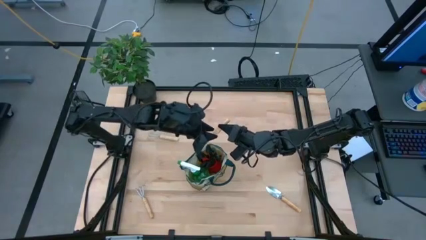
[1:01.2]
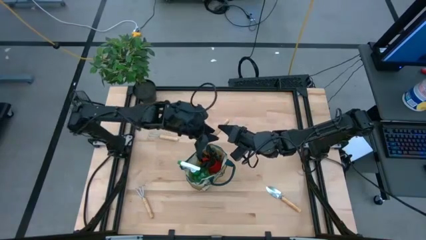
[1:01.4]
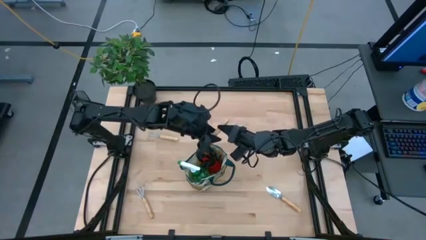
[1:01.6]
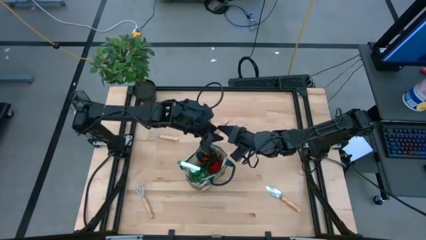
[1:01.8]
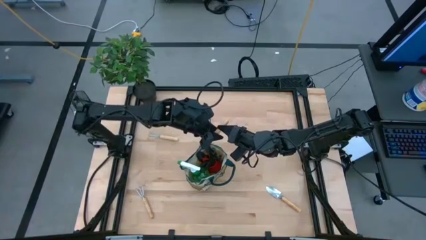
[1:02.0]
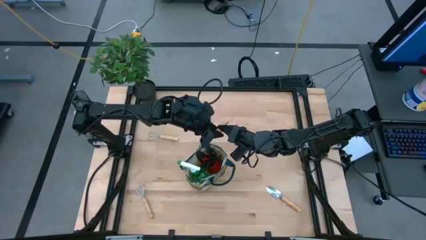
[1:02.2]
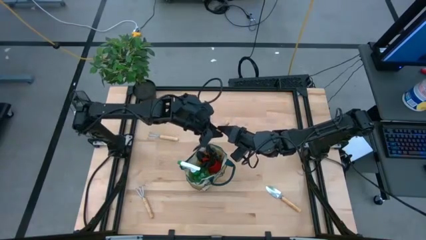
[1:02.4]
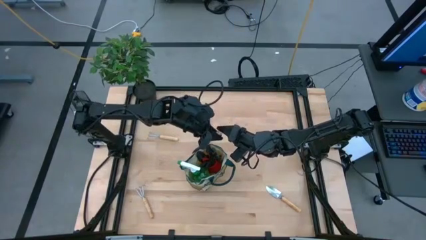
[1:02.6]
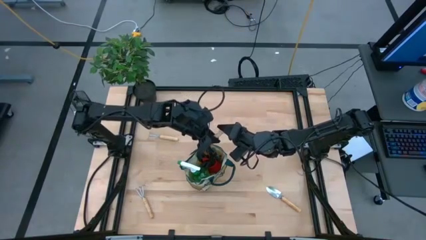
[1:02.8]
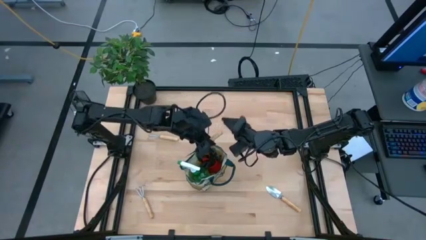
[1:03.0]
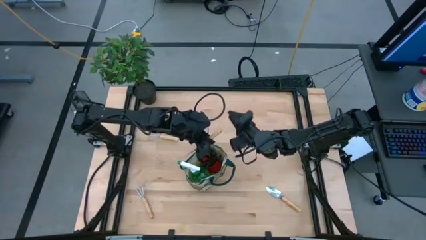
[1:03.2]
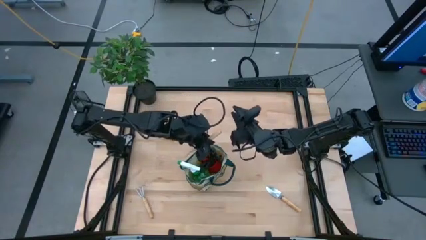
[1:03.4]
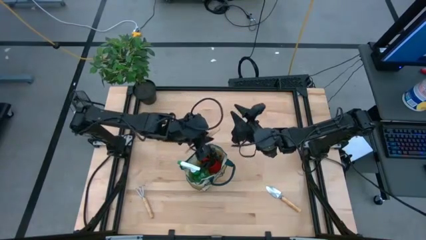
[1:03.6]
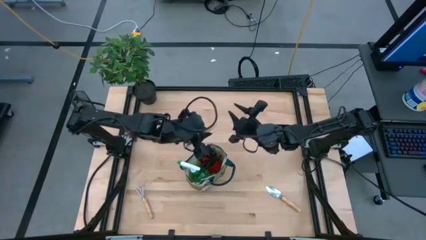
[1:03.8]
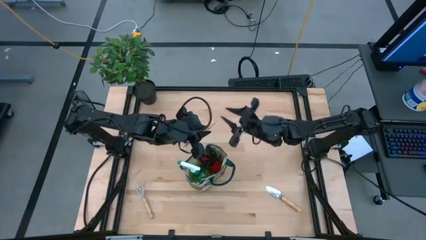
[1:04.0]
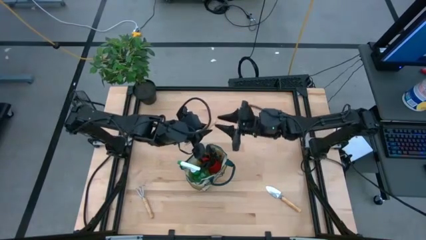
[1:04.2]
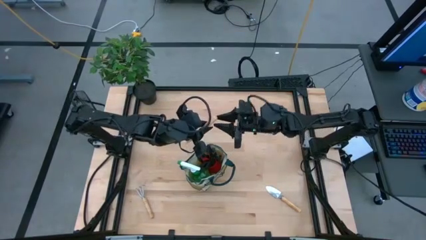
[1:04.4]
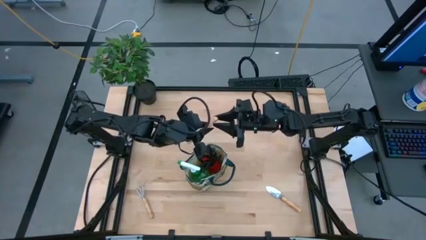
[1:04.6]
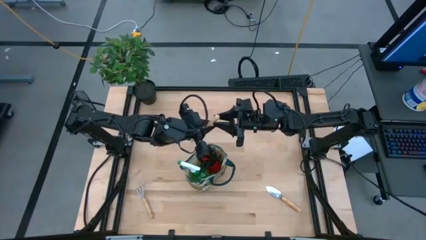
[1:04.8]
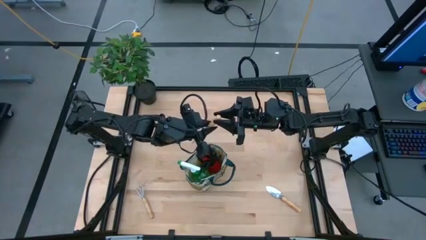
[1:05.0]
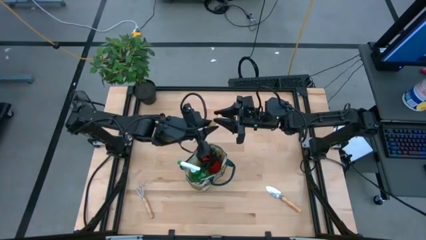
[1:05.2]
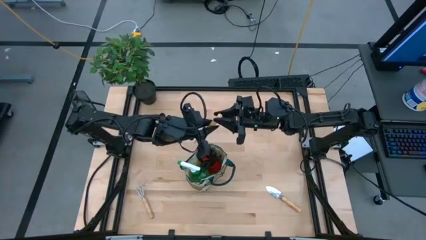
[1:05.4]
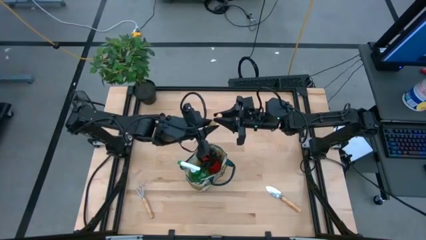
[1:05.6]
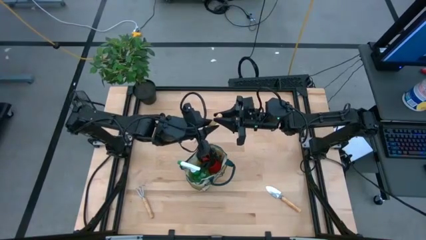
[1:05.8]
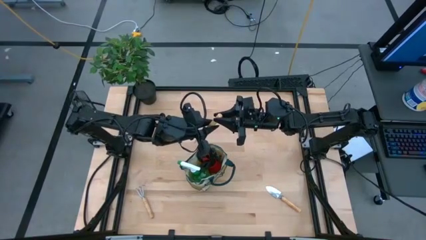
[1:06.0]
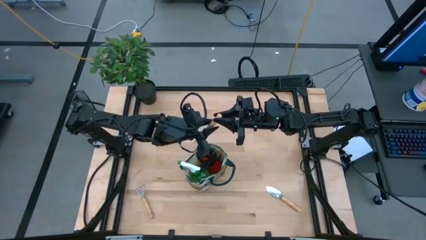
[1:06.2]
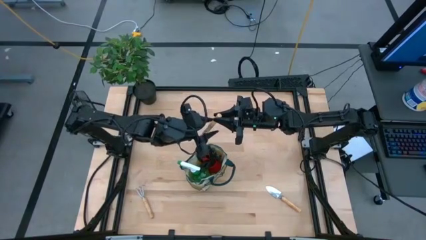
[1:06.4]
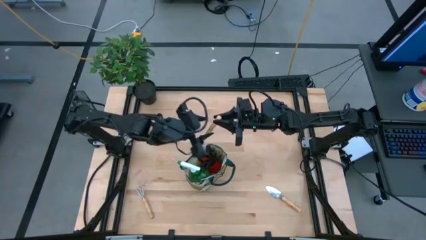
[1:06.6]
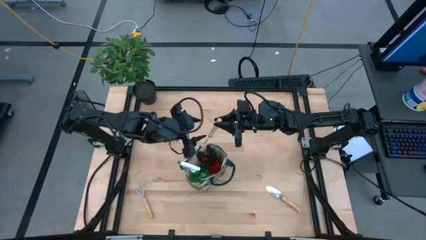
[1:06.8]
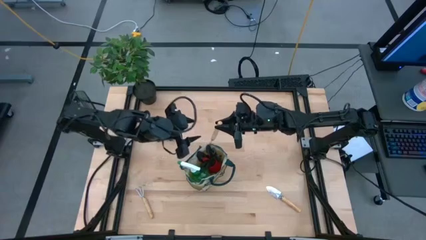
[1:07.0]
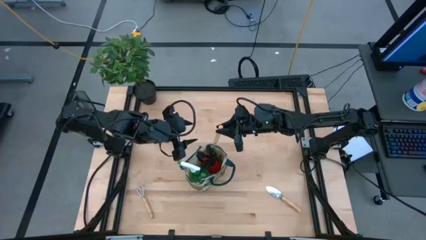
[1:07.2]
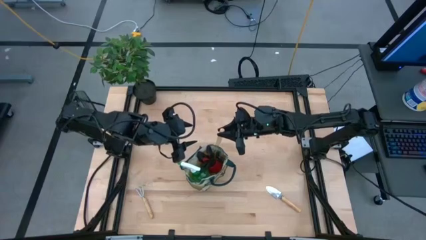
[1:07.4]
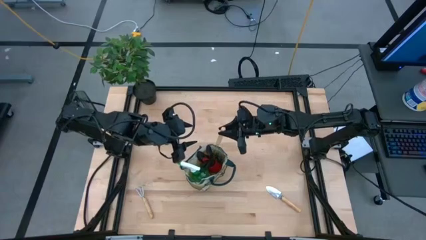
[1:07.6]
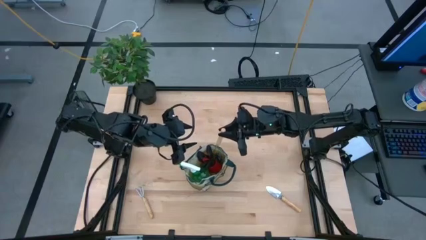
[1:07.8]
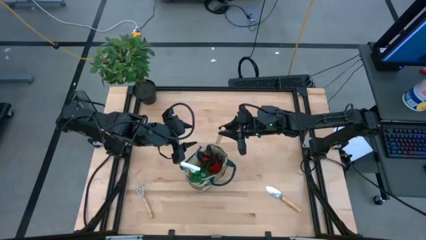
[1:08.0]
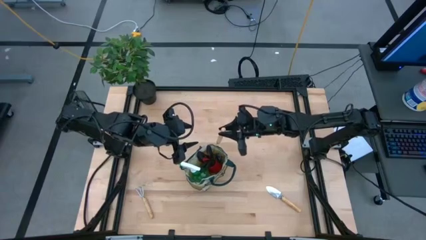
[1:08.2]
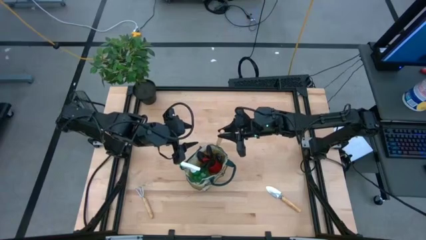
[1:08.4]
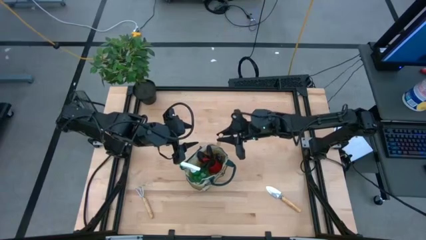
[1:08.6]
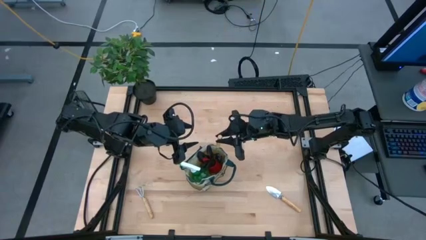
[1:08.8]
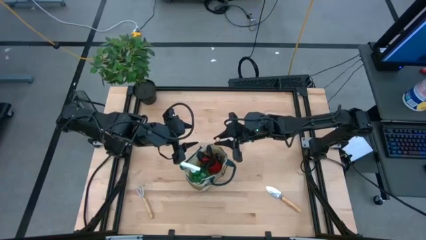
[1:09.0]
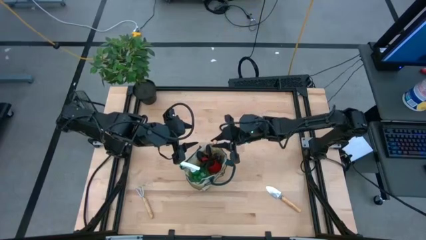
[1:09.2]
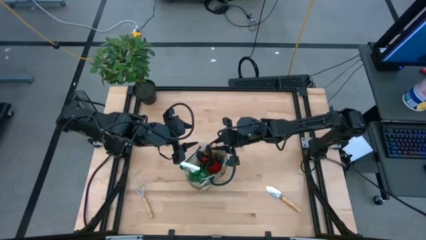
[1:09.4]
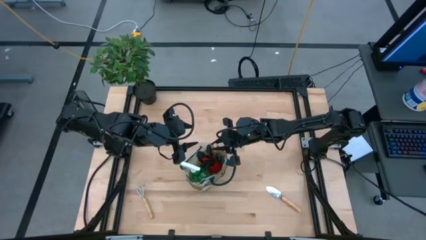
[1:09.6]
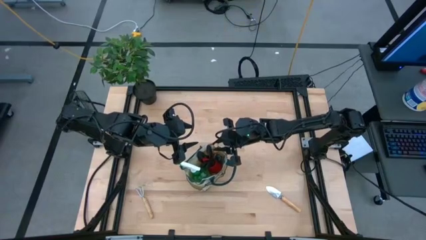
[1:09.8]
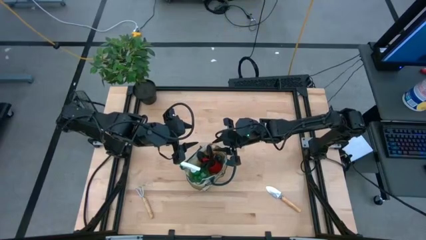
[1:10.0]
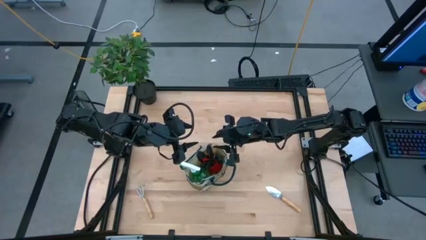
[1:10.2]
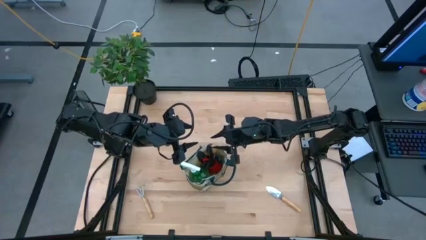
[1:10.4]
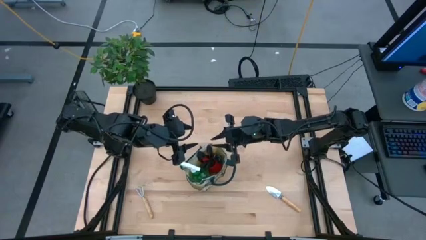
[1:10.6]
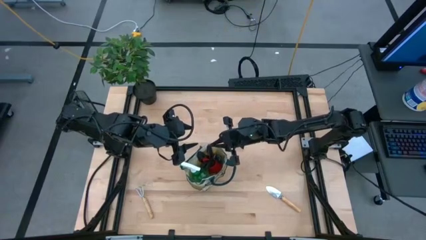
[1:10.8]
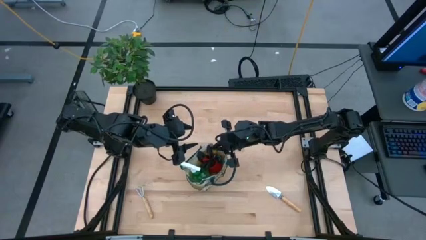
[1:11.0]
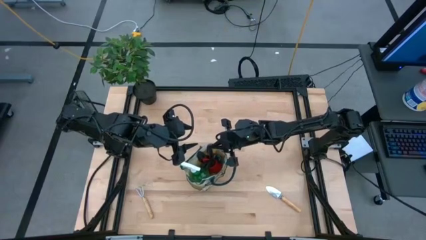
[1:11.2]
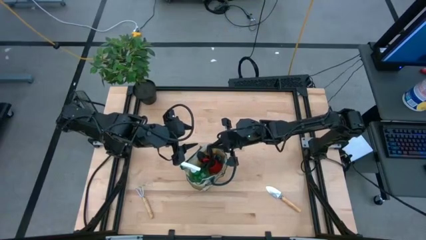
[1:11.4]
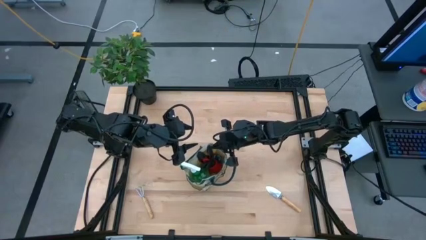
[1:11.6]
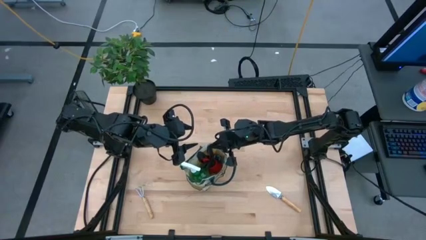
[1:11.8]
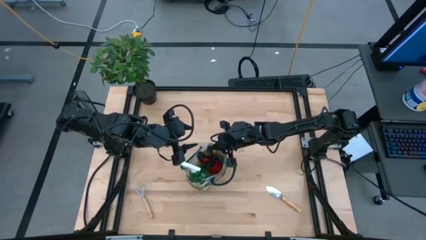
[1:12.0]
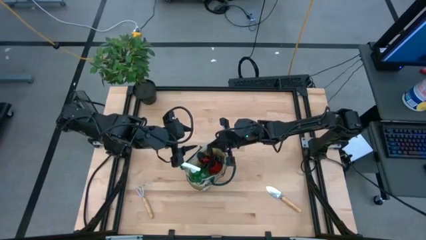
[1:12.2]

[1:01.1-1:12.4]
Task: Pick & Place Garden tools in Gardening bag
Put the top trowel into the gardening bag

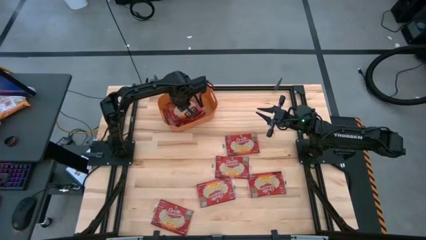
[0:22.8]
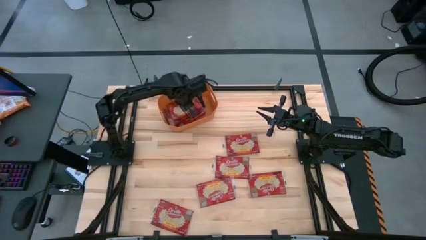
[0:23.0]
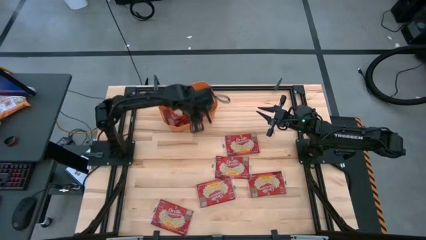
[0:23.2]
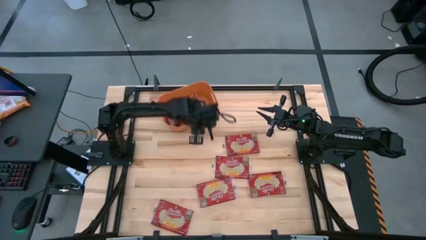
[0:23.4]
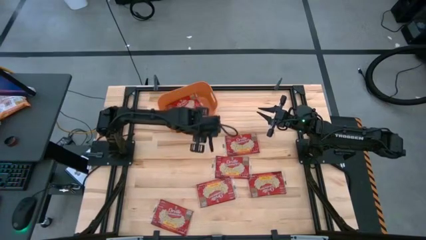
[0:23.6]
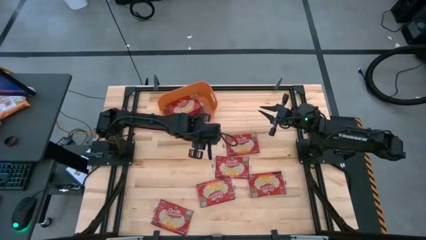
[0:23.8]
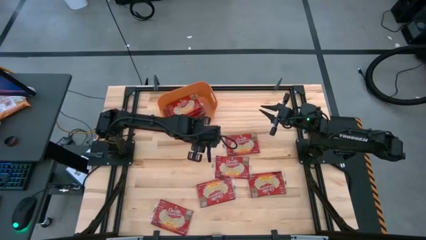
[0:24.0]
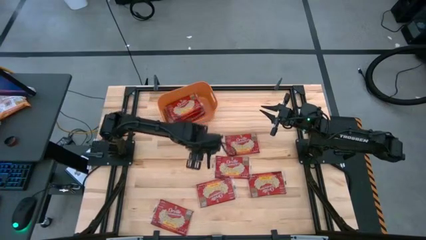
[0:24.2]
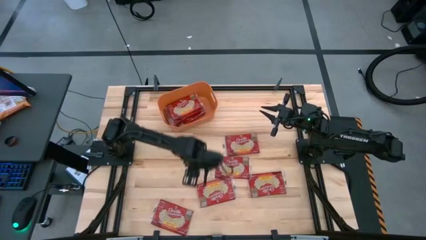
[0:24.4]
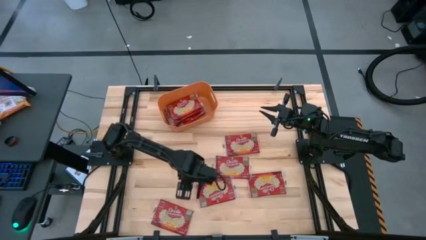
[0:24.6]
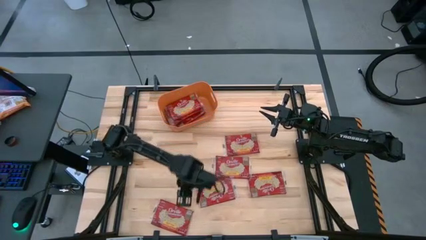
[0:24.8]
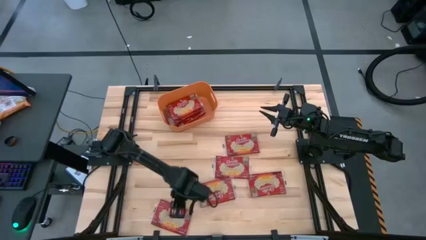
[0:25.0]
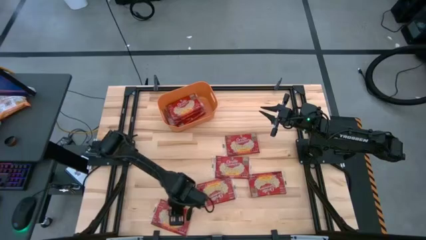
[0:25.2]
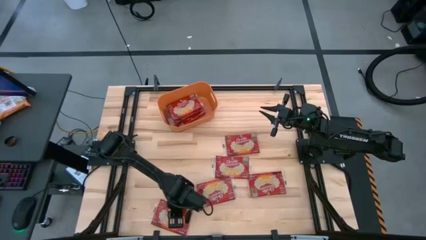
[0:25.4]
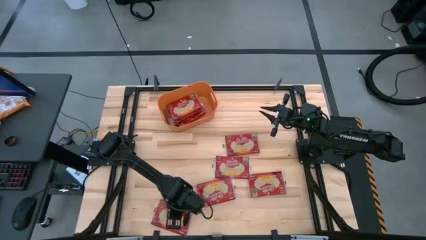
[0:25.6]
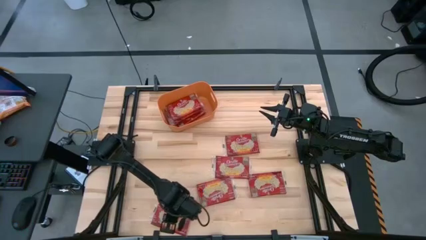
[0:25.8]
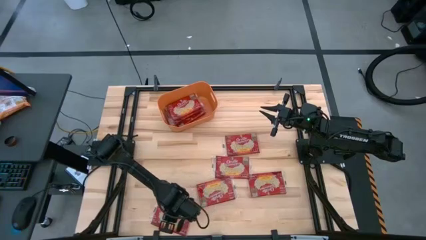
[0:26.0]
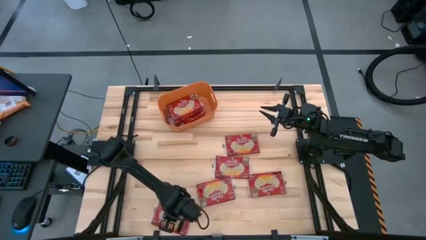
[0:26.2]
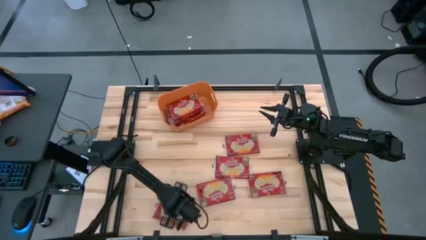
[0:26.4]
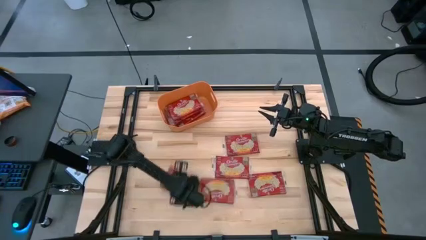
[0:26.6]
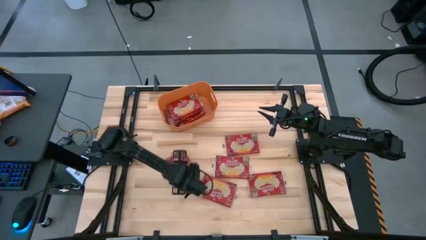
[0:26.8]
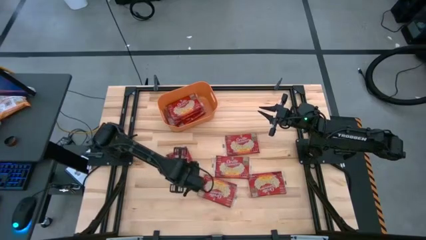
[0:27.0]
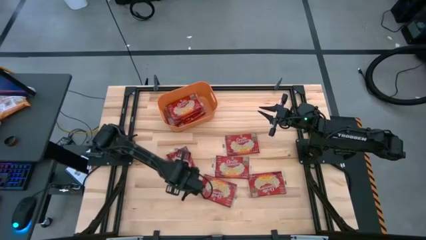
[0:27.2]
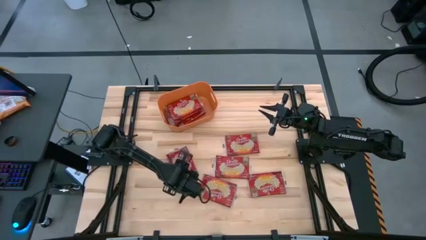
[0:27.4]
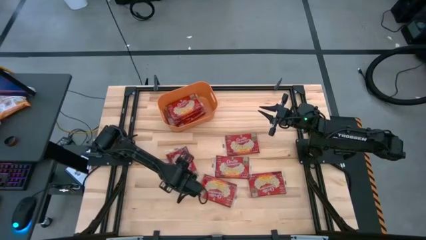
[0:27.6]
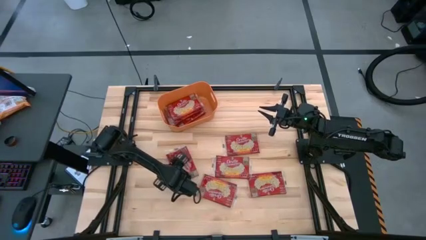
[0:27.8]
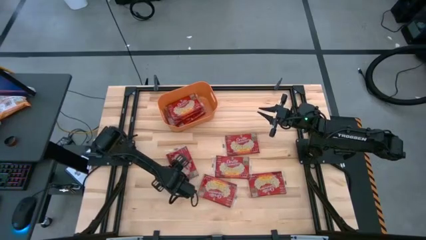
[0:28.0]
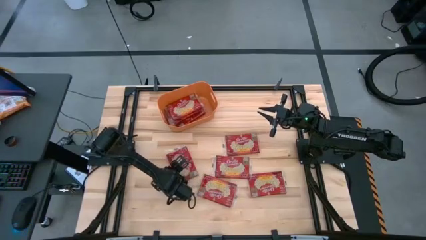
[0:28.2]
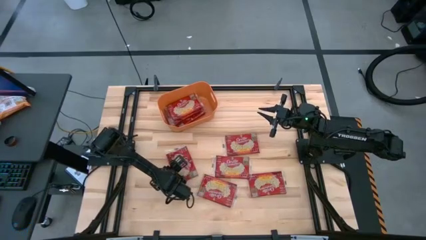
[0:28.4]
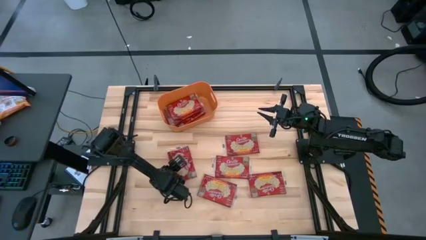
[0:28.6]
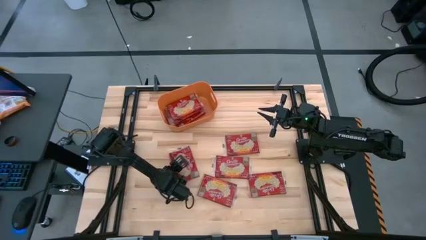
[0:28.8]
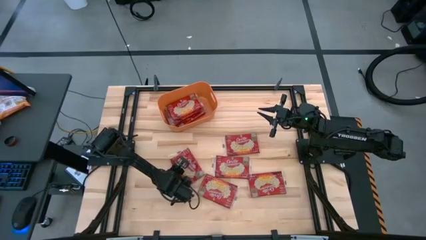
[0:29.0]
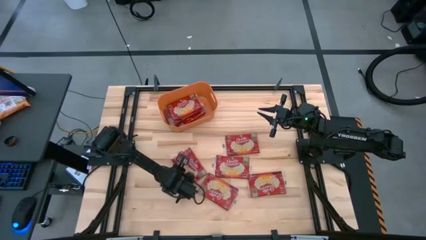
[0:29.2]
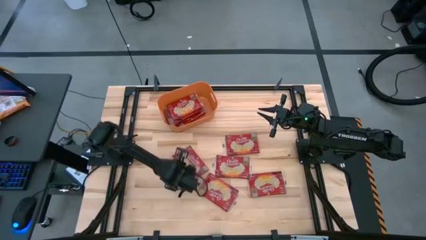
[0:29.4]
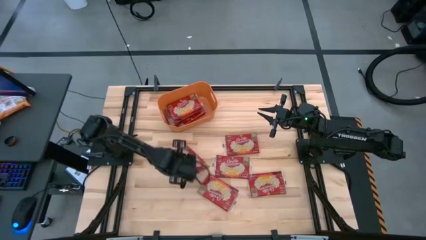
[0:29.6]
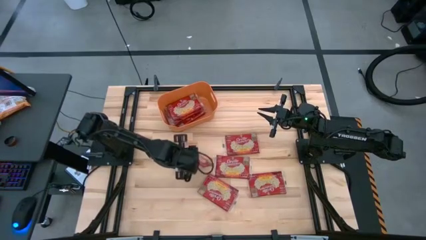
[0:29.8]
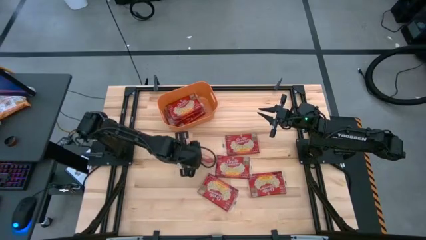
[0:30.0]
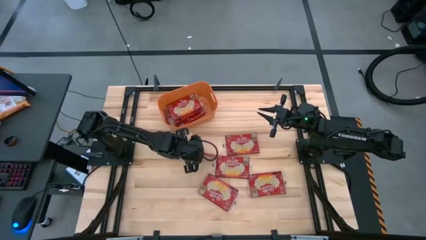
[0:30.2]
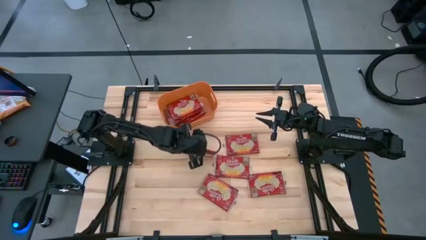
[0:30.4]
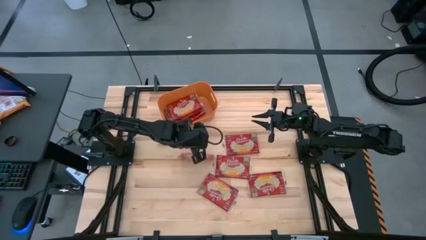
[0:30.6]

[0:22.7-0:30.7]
Task: Sort popcorn bags into baskets
Put the red popcorn pack into the orange bin
